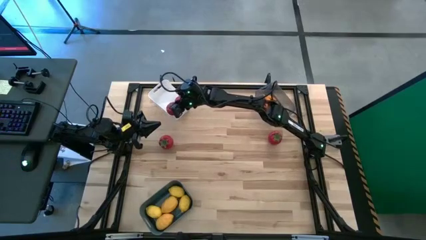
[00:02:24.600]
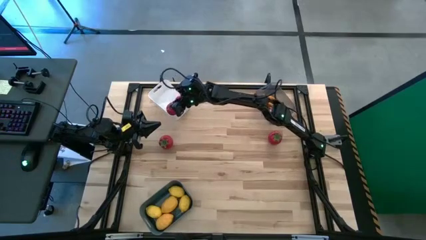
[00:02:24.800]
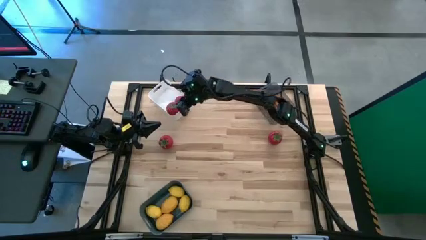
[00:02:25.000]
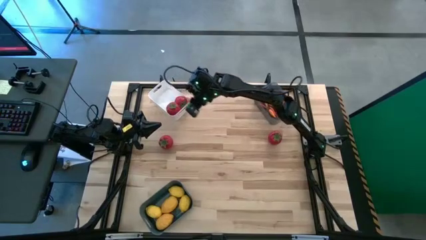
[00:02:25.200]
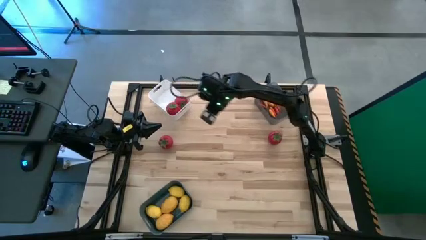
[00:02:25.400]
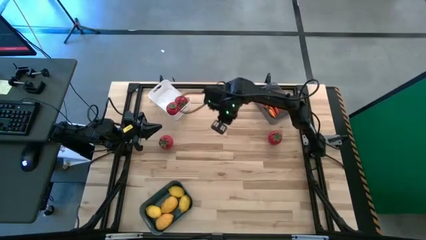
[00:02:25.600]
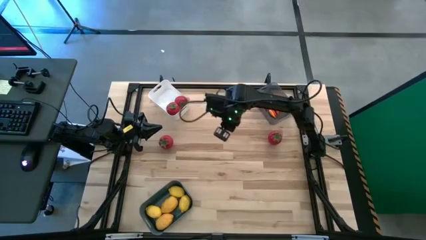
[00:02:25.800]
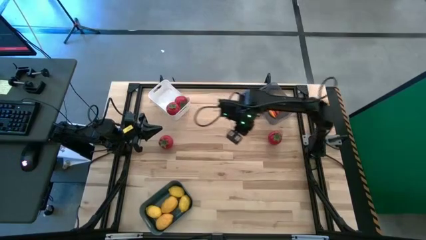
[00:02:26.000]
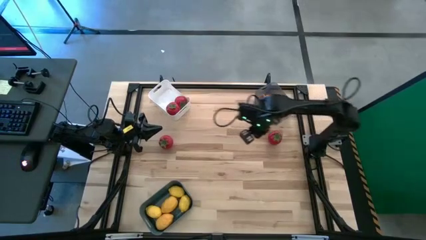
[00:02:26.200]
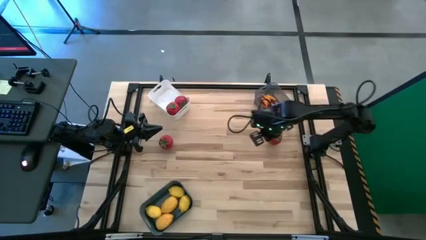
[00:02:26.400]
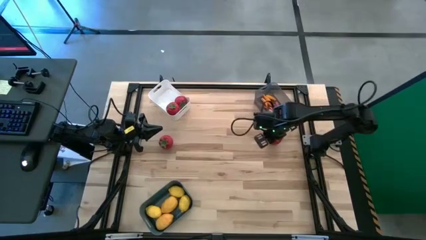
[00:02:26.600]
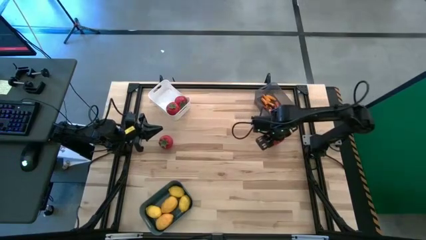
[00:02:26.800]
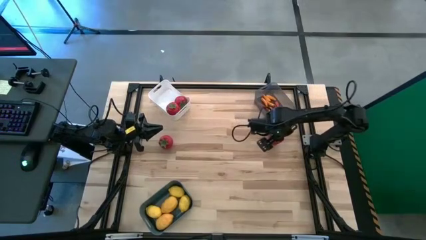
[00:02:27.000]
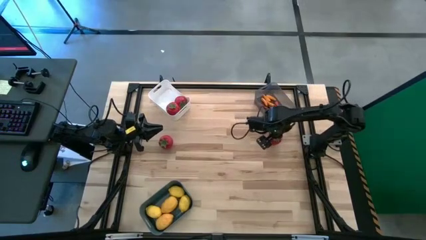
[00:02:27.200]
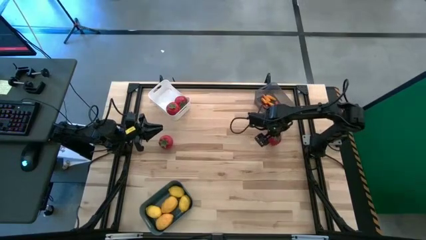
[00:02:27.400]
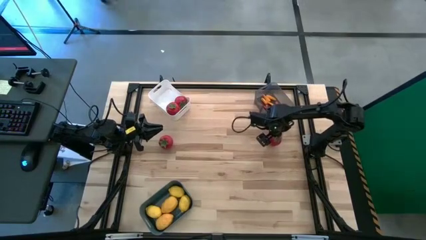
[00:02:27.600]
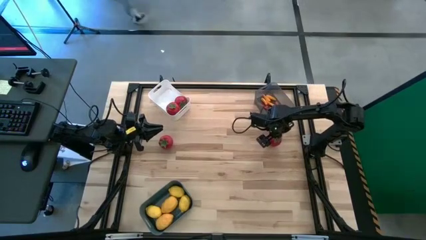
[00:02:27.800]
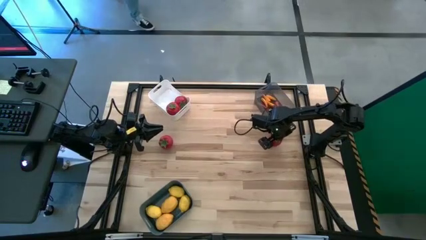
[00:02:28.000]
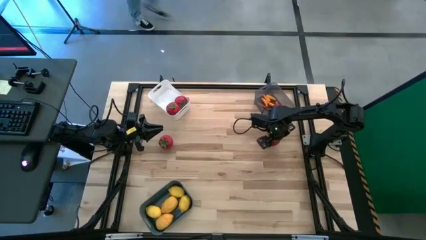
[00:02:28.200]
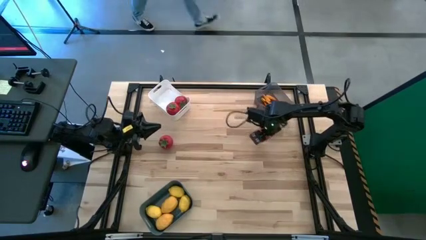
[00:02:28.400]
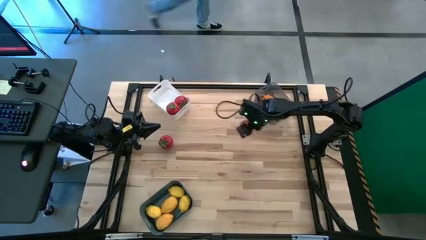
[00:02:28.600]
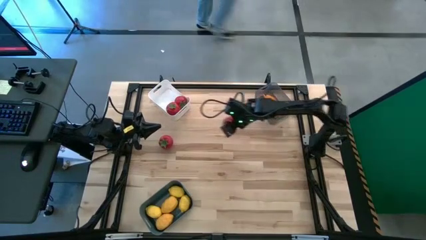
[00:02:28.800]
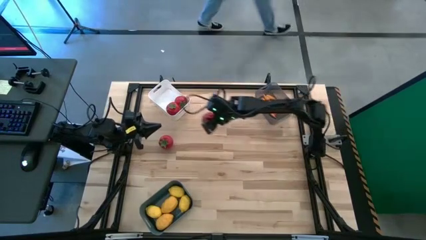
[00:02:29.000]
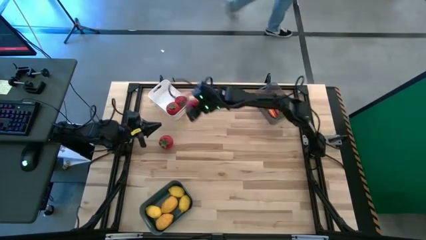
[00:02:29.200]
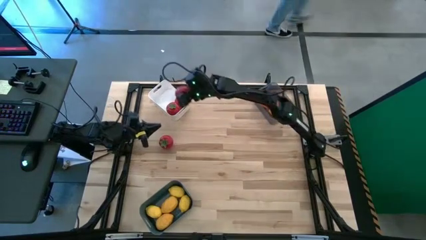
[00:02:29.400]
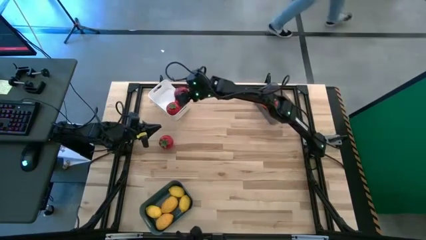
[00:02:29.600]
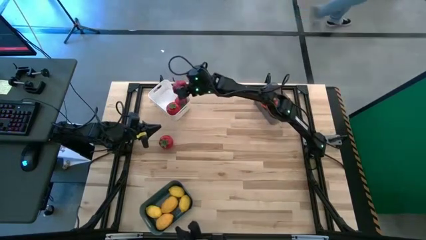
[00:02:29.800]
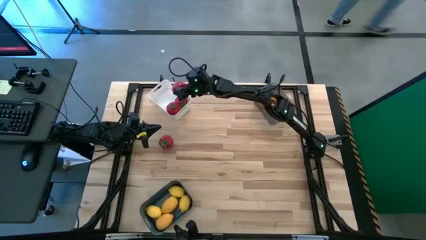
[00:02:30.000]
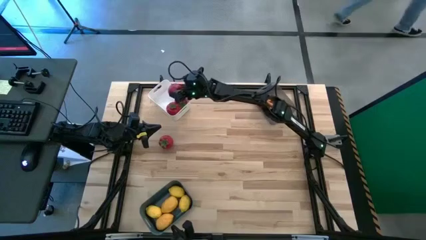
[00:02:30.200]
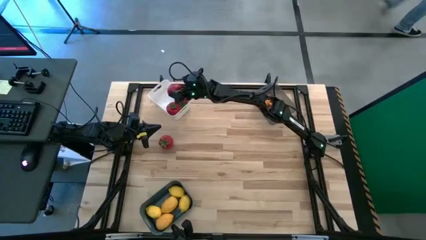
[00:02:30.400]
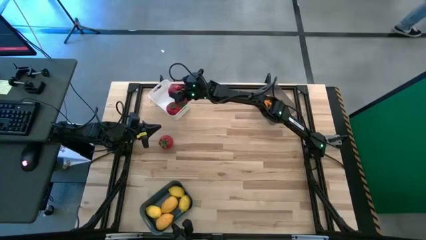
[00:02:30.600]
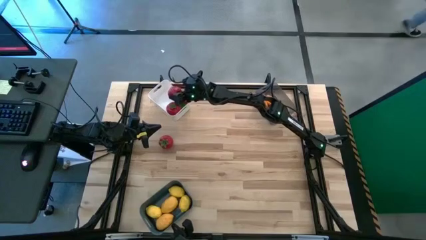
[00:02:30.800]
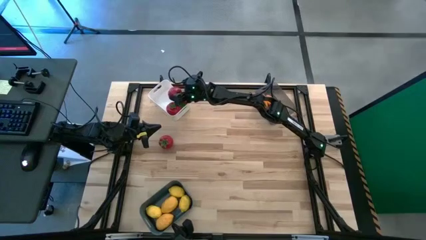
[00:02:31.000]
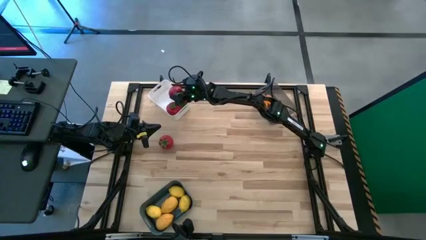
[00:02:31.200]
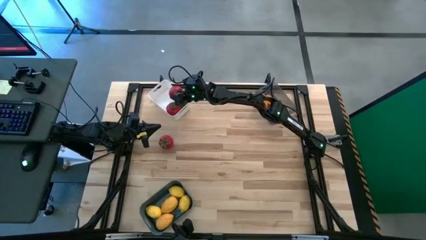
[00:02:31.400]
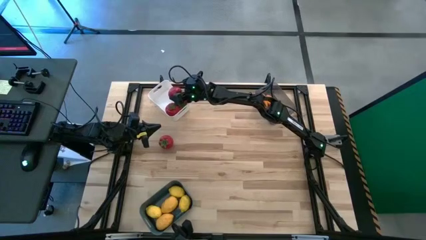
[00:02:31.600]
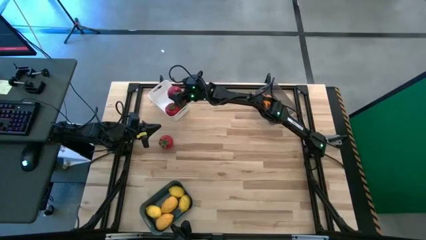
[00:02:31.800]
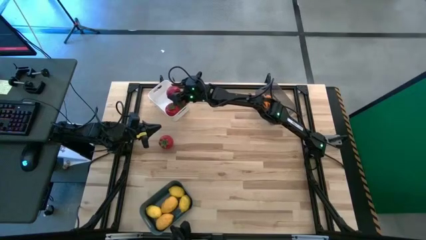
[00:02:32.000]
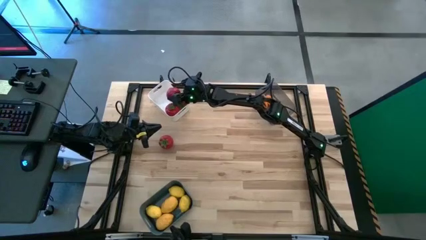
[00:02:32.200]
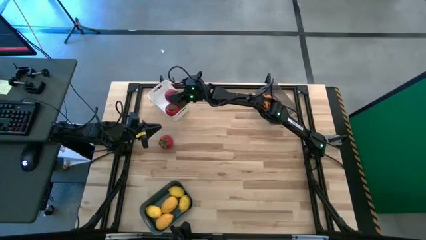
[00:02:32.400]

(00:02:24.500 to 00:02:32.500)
Task: Sort produce into baskets
Put the tomato into the white bin

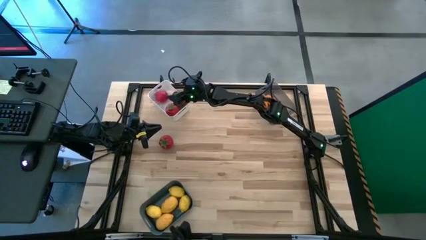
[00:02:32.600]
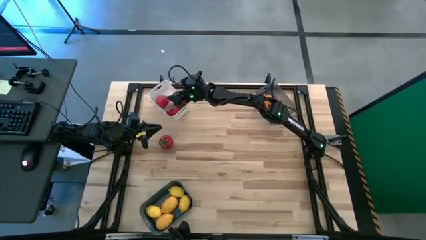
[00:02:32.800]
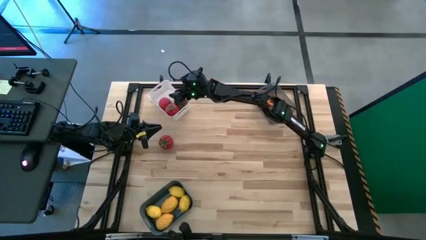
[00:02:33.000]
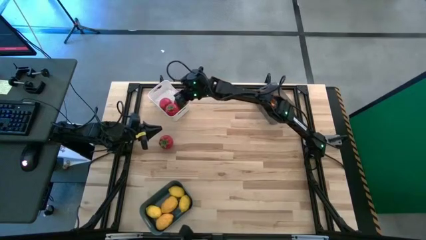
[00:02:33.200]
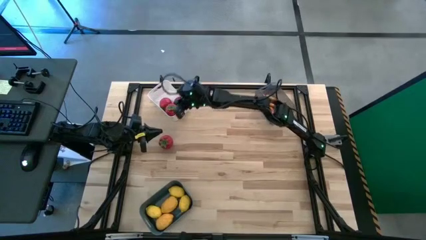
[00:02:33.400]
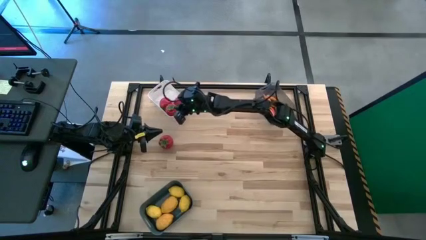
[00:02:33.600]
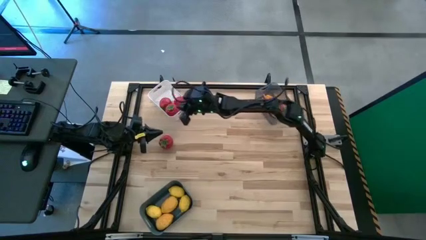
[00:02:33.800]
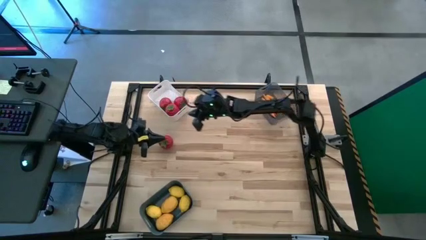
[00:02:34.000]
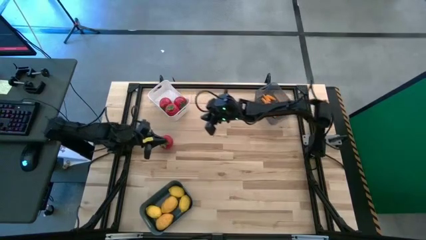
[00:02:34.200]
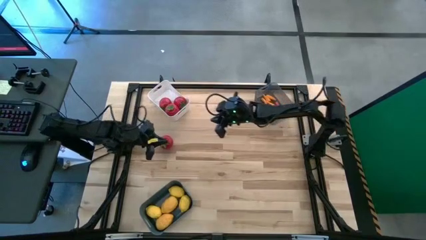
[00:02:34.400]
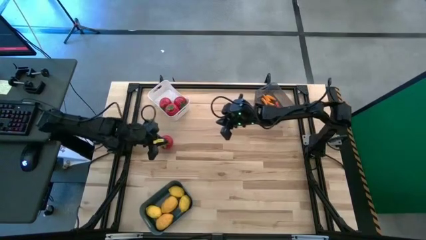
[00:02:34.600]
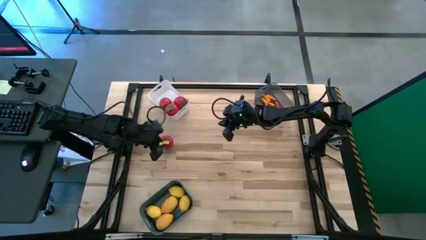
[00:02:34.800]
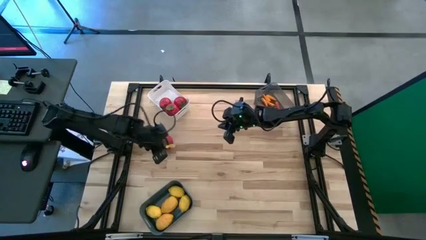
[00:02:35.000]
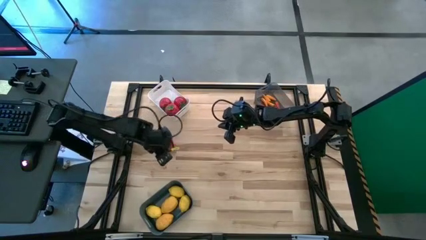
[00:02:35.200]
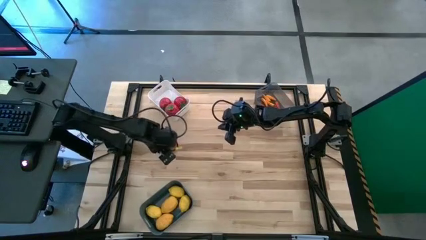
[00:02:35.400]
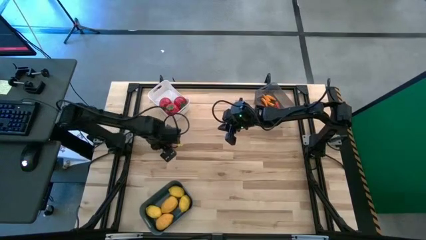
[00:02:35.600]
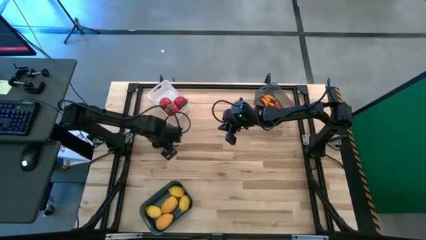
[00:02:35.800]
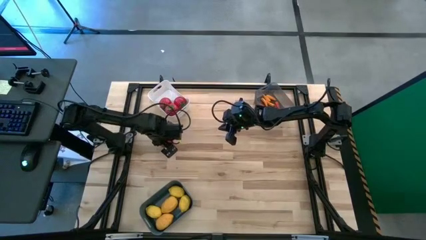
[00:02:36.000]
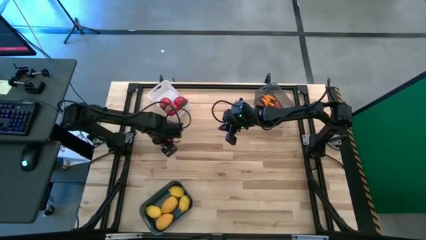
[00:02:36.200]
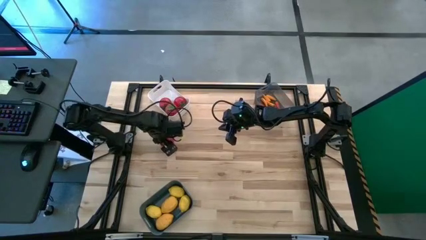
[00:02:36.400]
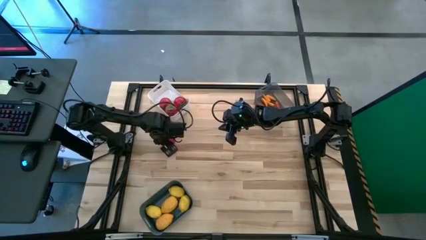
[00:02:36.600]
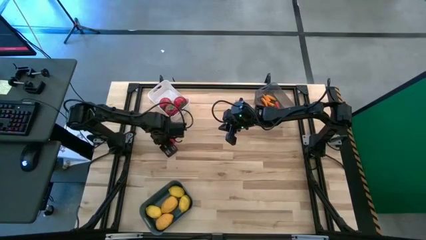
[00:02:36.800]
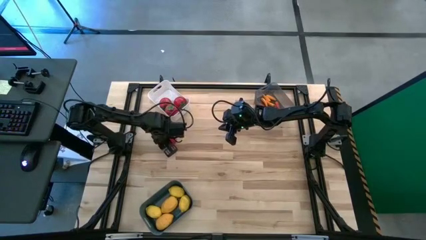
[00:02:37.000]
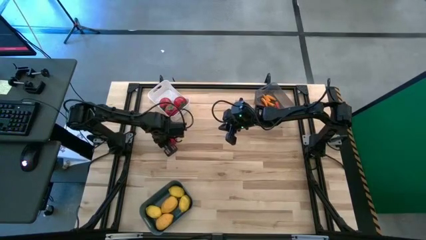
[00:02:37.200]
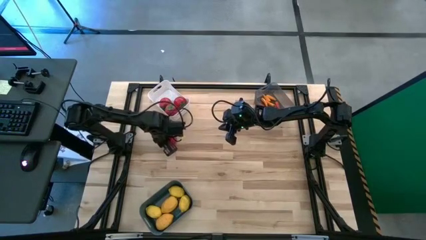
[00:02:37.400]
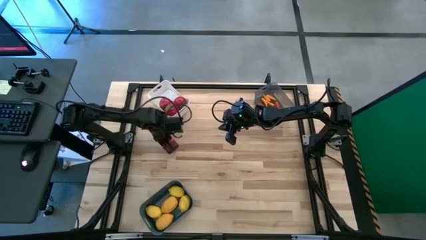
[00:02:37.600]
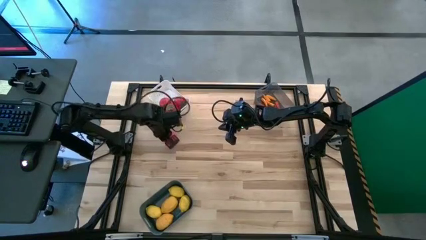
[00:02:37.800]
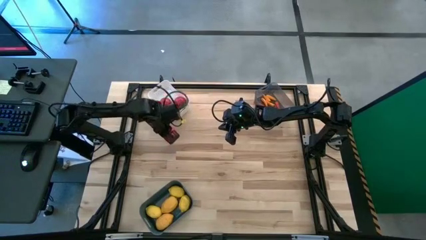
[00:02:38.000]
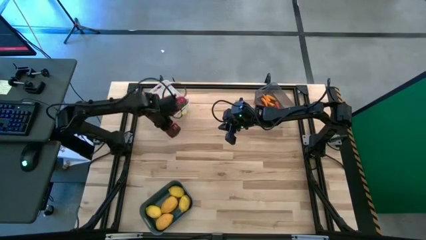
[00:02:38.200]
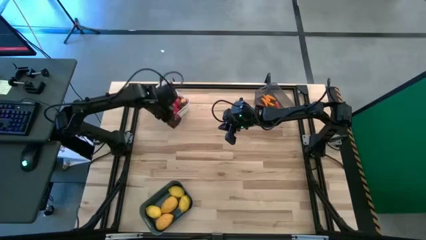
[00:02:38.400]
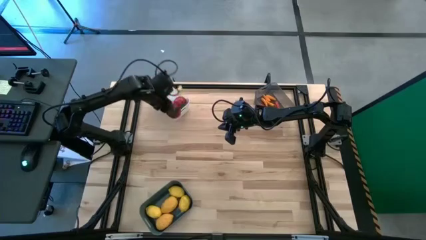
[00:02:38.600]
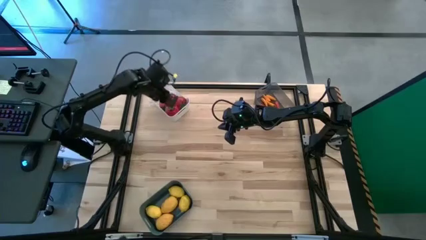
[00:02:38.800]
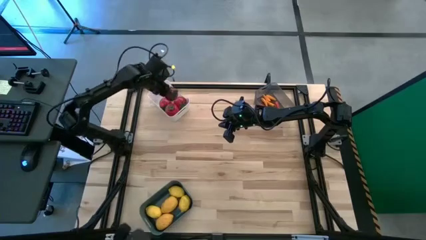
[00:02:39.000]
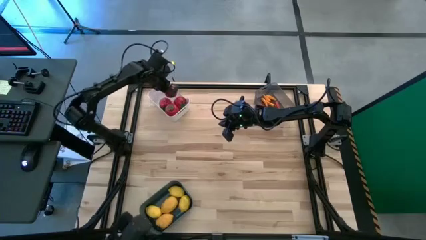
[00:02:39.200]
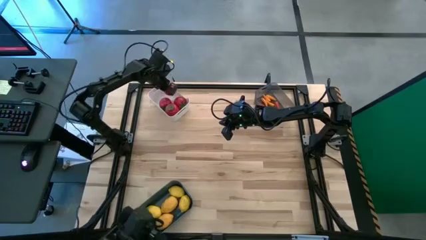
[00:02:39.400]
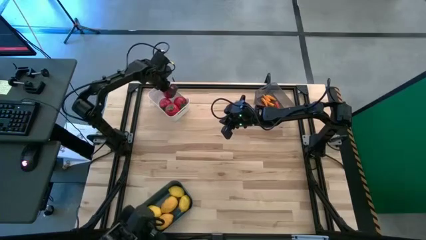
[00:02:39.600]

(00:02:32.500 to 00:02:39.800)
Put the tomato into the white bin

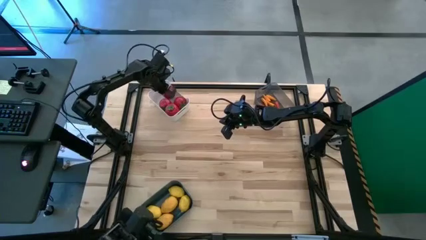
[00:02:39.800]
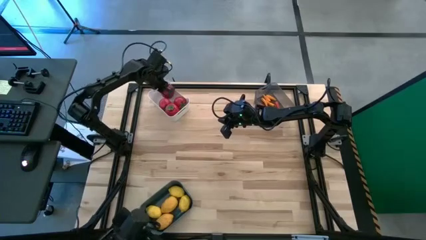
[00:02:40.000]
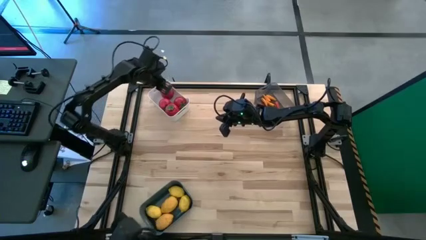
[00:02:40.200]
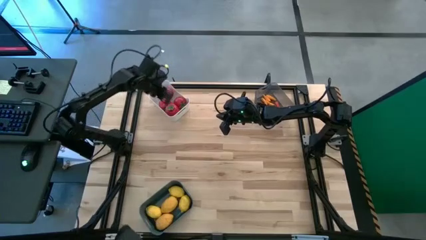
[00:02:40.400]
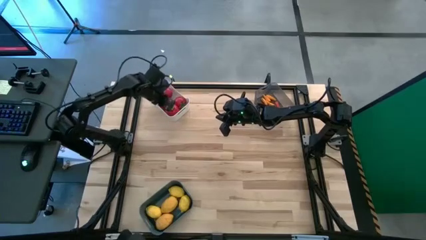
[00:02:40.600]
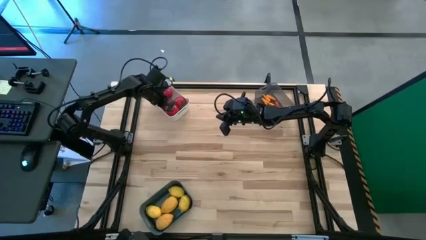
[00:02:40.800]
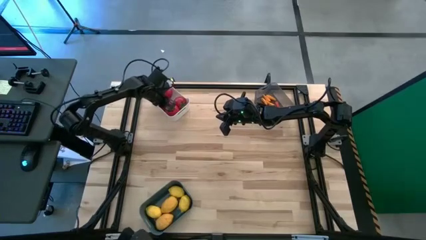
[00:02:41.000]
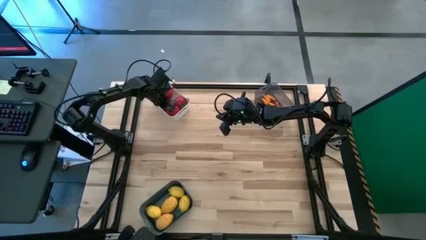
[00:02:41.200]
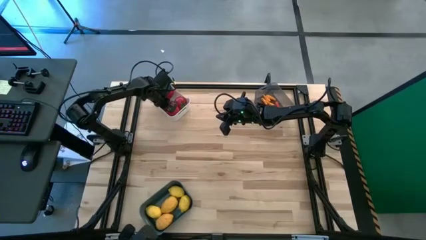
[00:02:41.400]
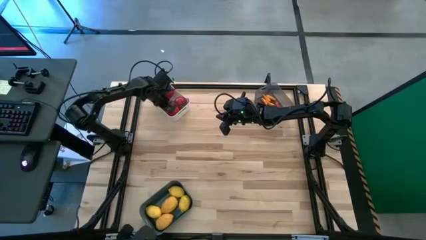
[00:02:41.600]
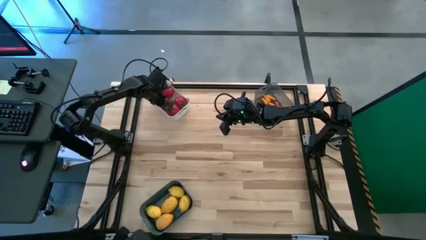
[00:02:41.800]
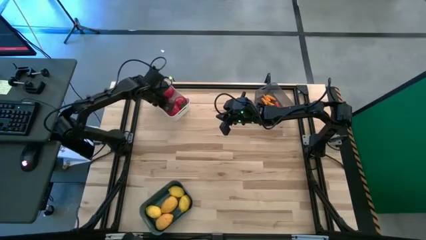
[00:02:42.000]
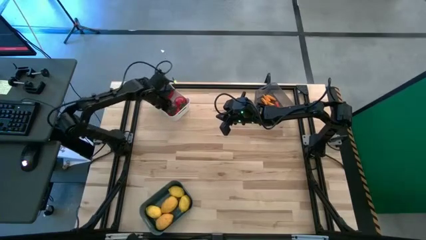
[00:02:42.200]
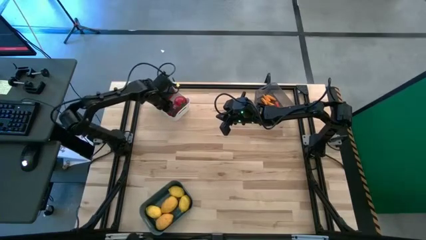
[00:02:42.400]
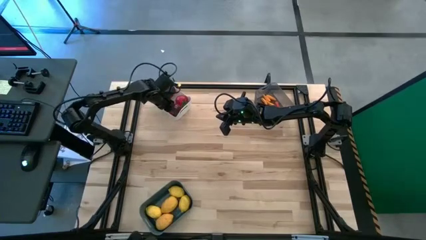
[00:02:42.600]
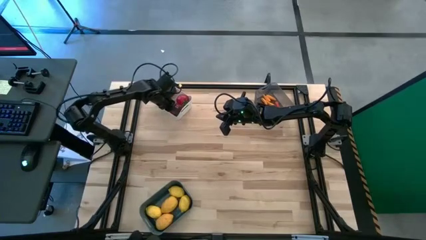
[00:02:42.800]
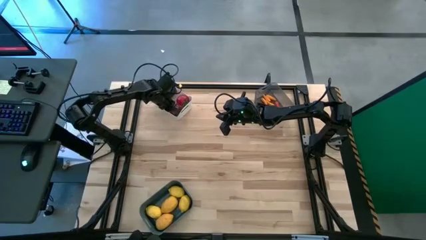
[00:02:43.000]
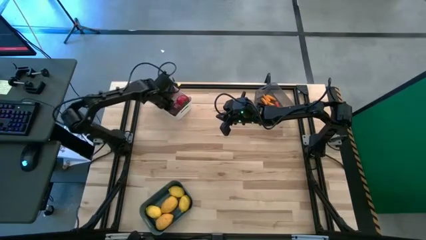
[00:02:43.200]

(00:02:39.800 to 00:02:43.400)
Adjust the tomatoes
